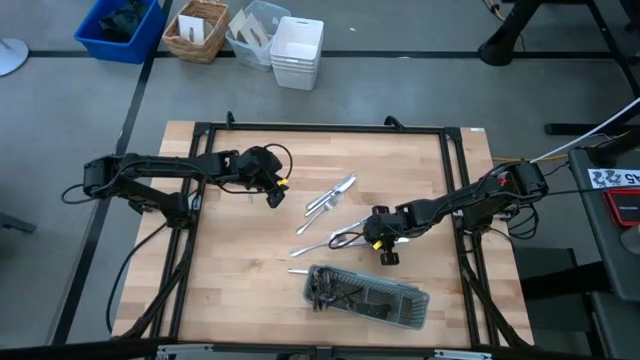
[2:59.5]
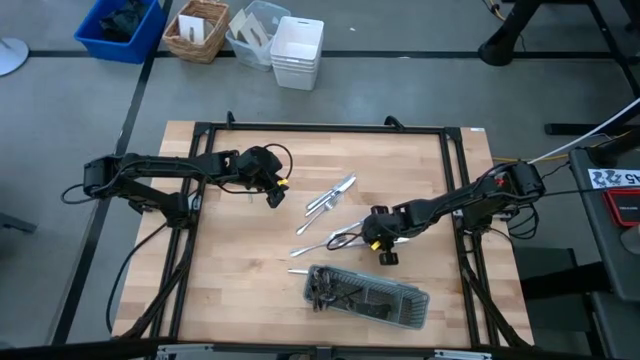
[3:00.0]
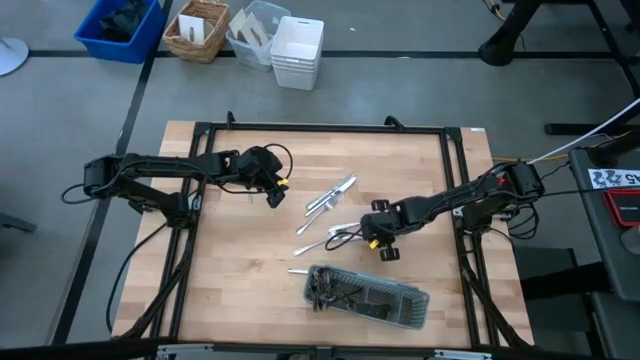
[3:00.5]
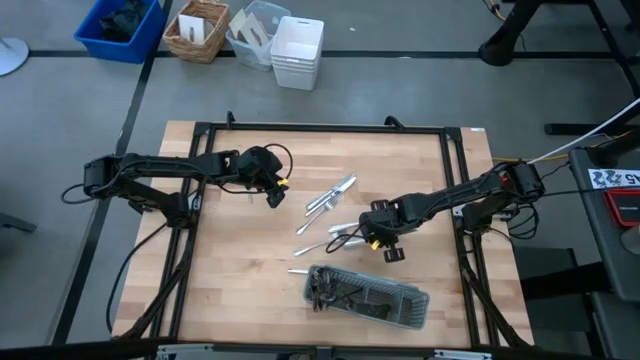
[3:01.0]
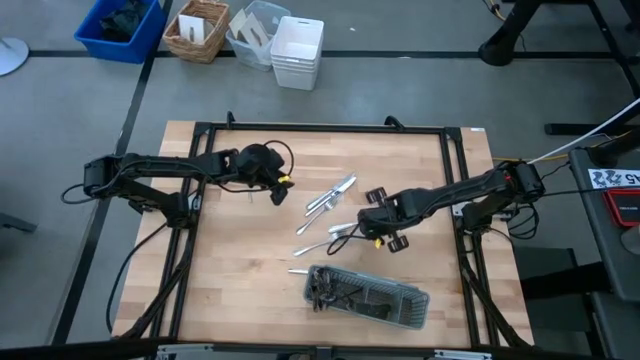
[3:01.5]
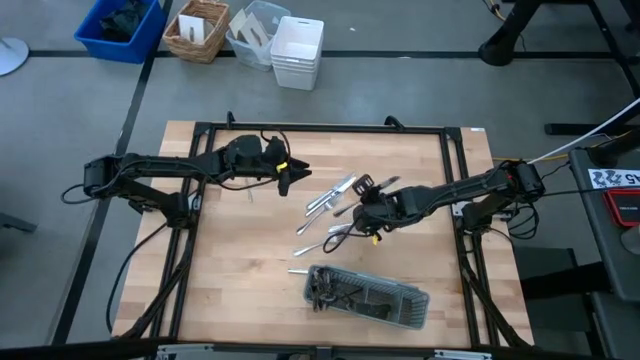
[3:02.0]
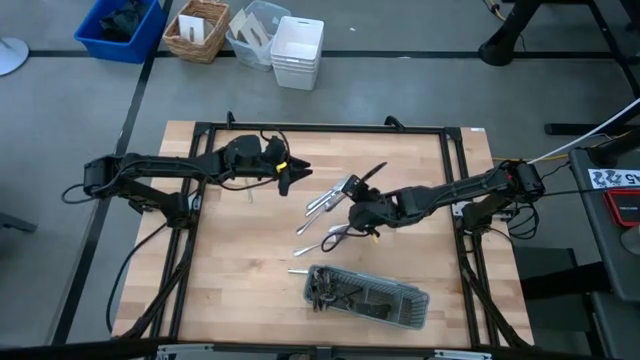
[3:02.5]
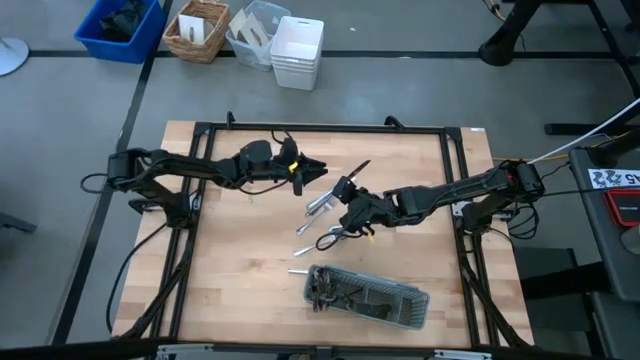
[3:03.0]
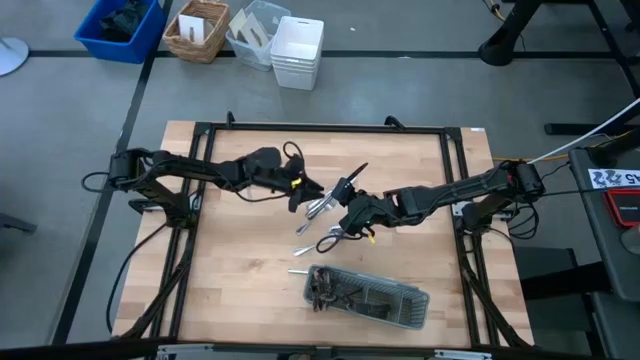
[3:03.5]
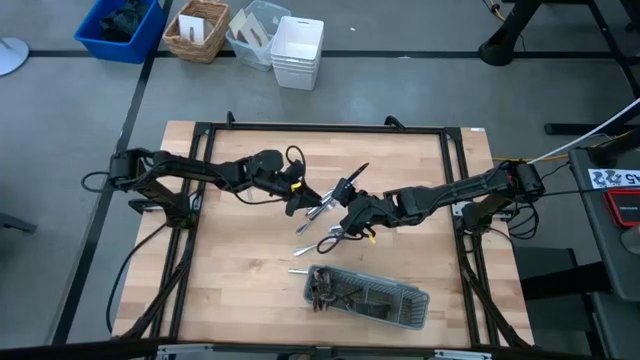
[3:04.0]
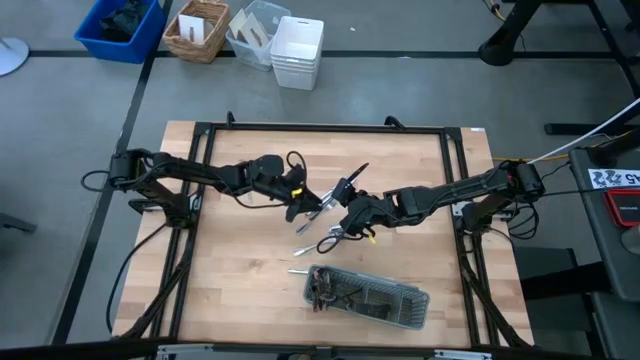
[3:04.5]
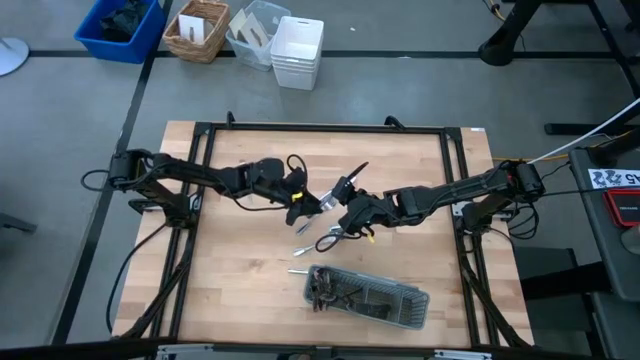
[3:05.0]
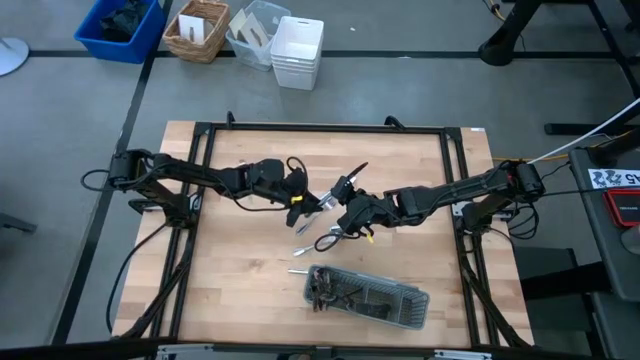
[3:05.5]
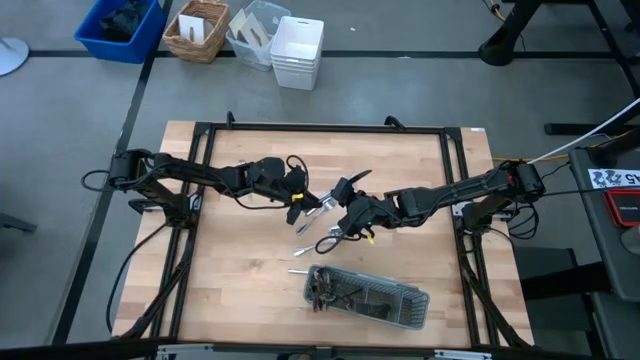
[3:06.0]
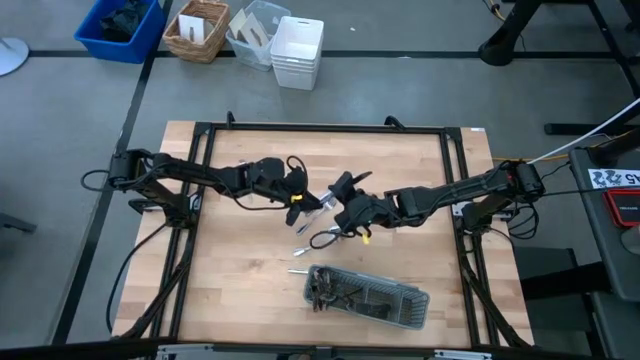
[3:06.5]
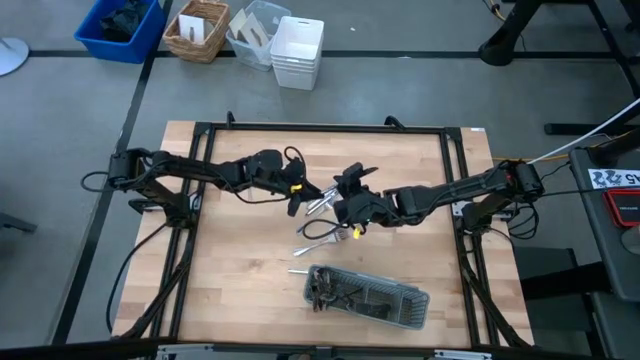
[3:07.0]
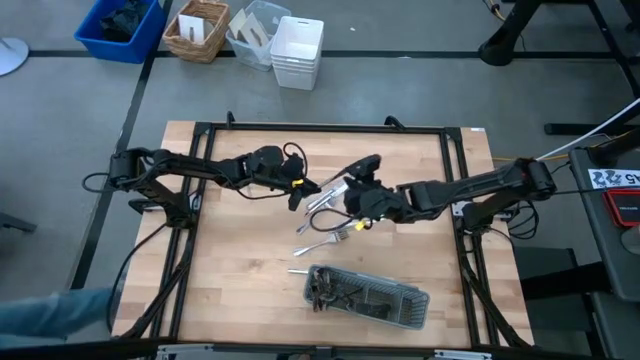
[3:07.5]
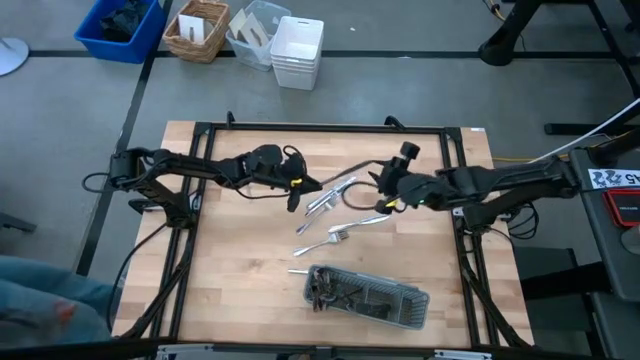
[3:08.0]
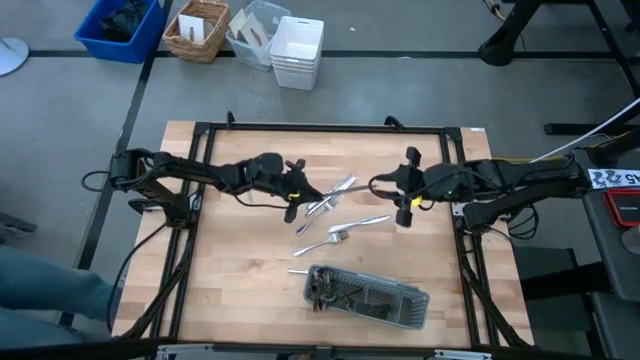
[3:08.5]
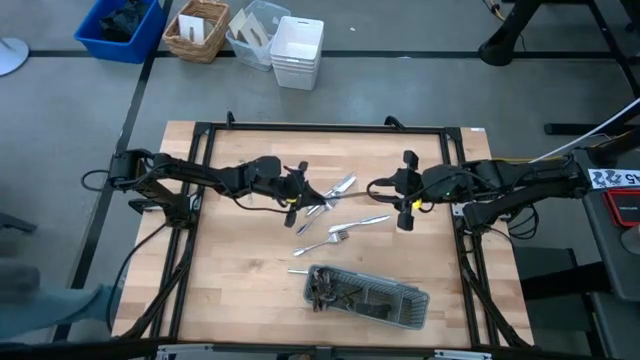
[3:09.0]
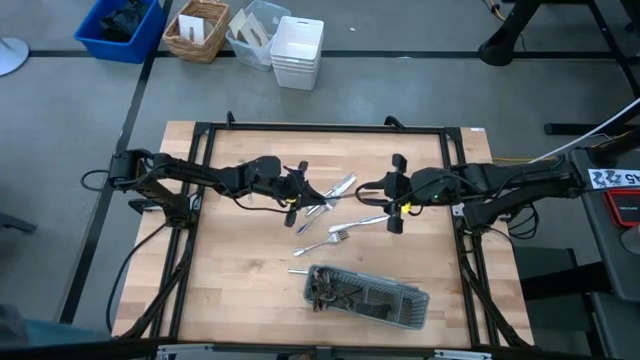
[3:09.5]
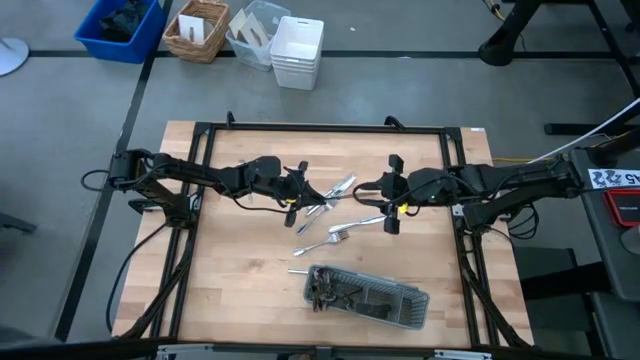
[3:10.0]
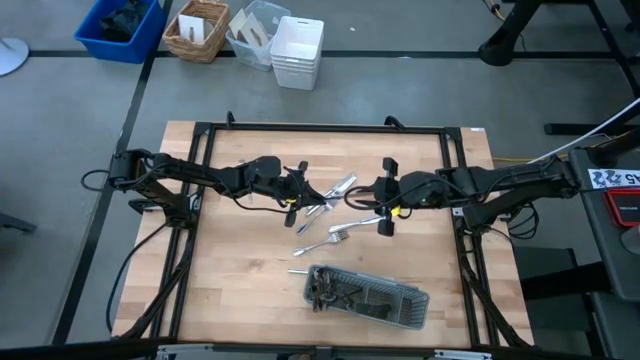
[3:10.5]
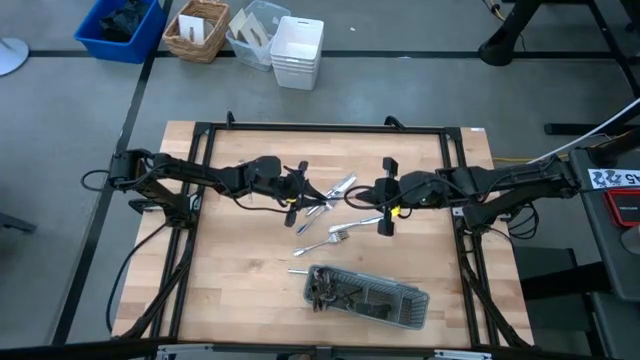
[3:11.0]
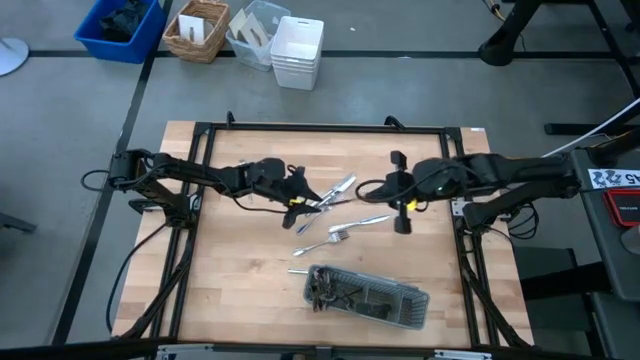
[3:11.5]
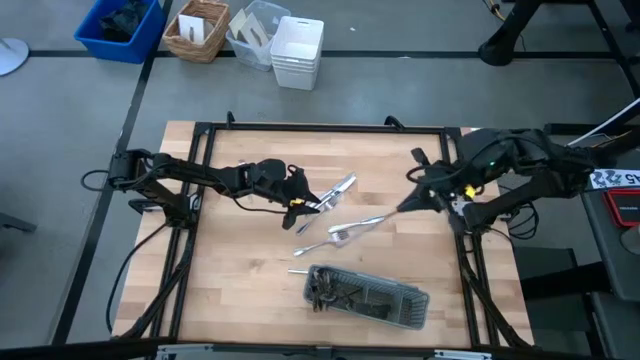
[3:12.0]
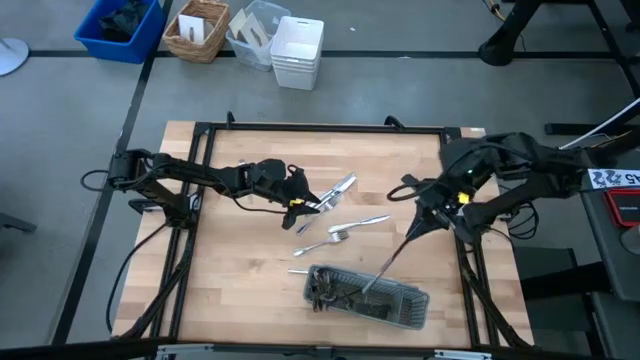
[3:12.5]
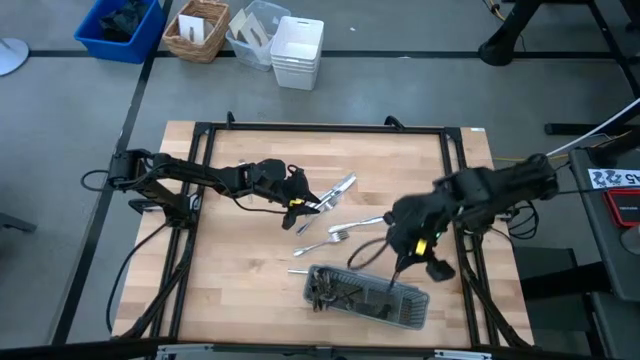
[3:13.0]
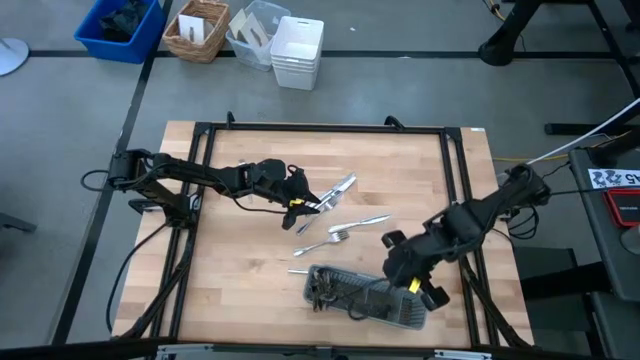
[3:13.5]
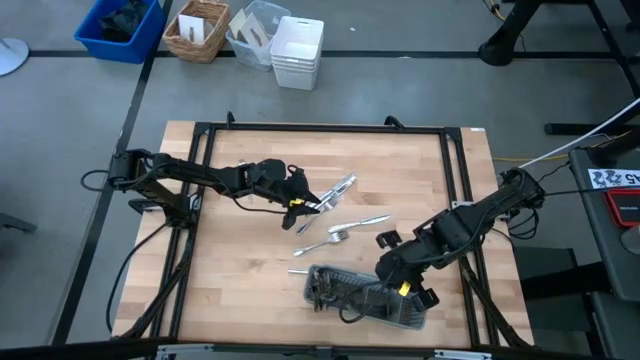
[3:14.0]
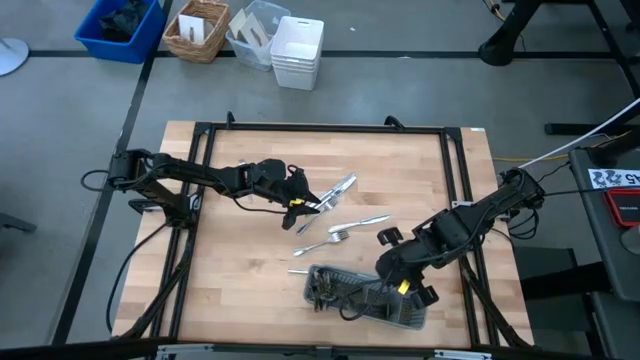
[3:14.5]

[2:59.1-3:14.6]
Task: Sort silverware
Put the knife into the gray silverware rack

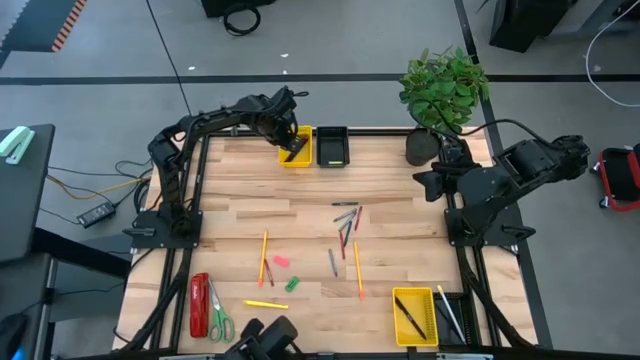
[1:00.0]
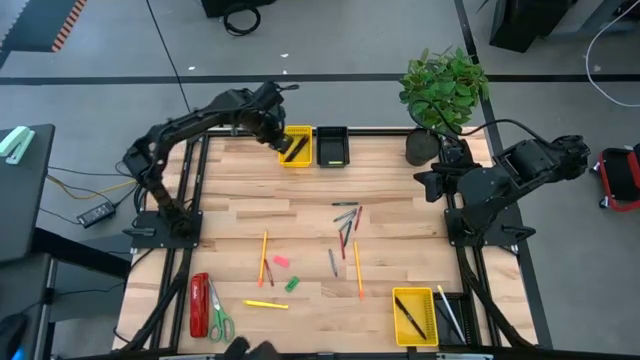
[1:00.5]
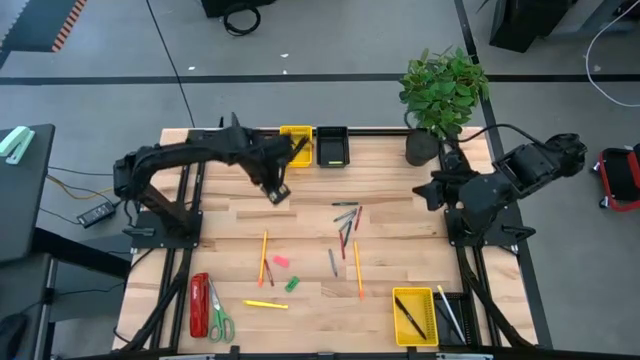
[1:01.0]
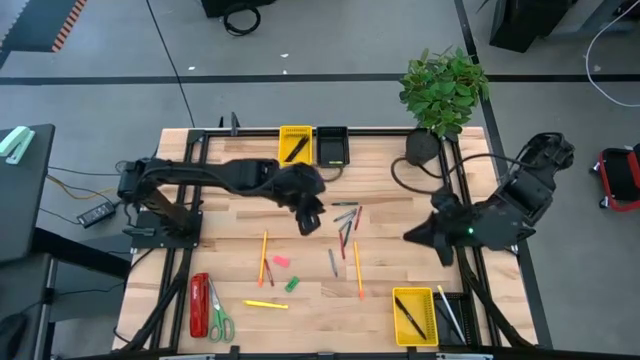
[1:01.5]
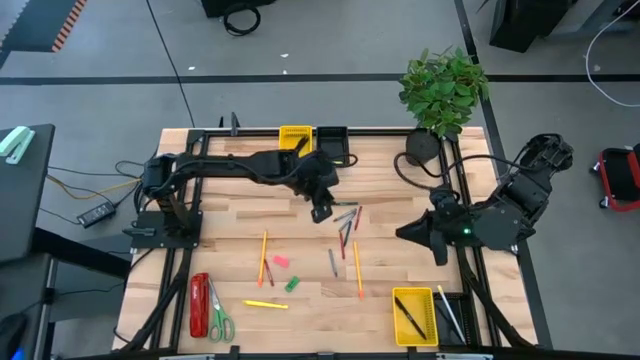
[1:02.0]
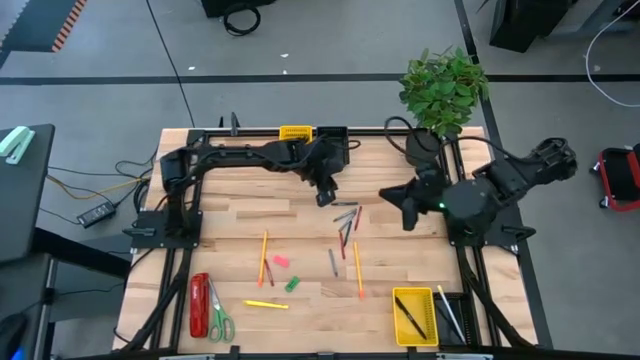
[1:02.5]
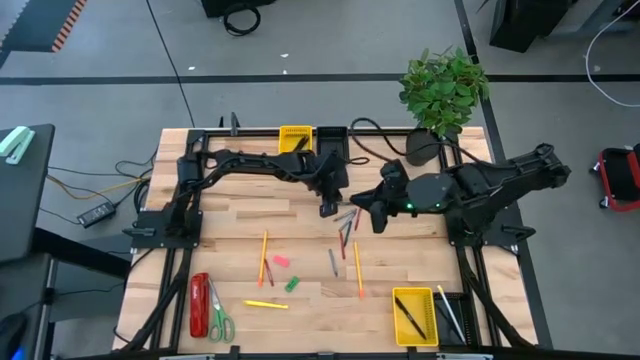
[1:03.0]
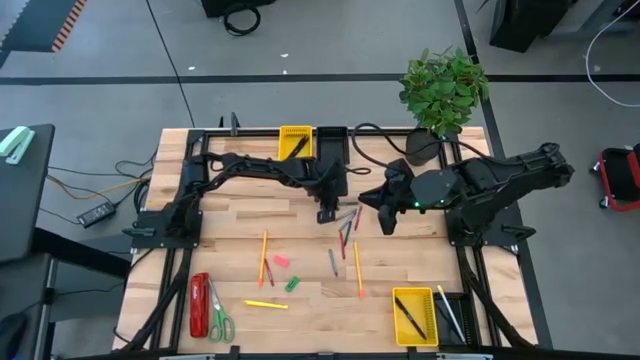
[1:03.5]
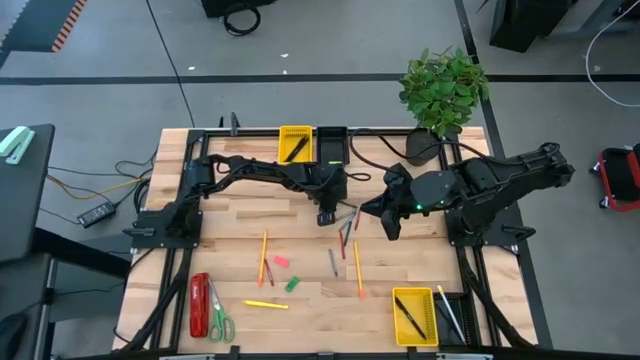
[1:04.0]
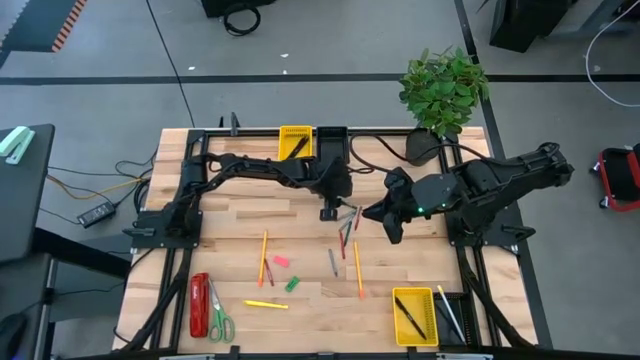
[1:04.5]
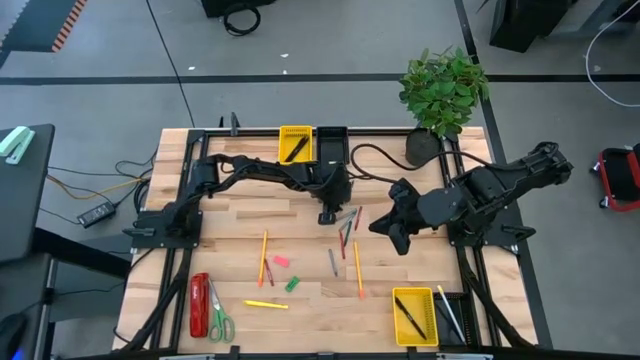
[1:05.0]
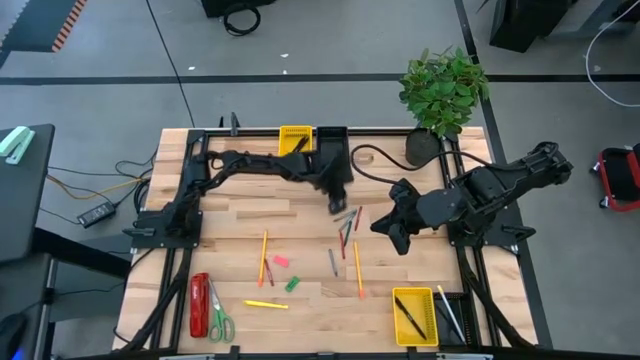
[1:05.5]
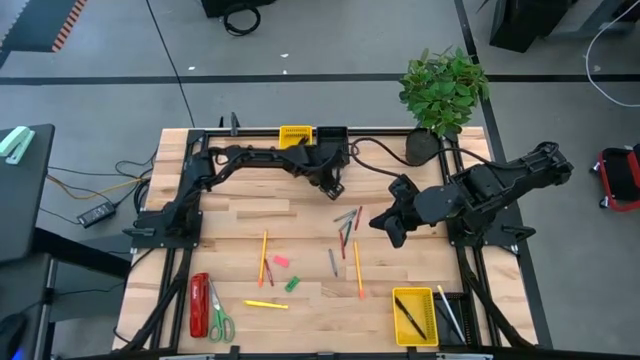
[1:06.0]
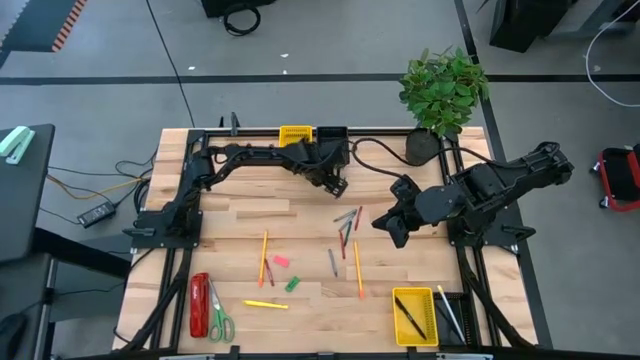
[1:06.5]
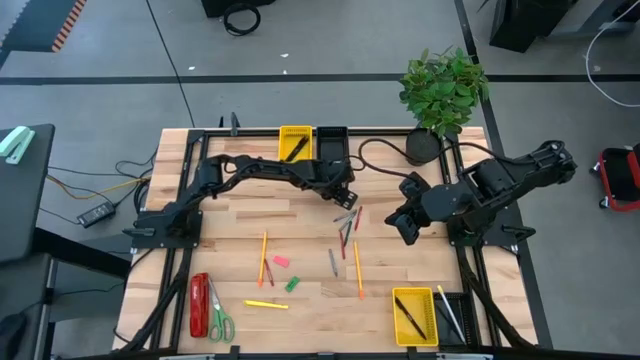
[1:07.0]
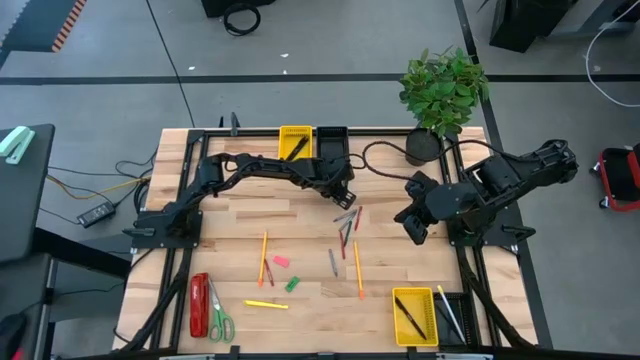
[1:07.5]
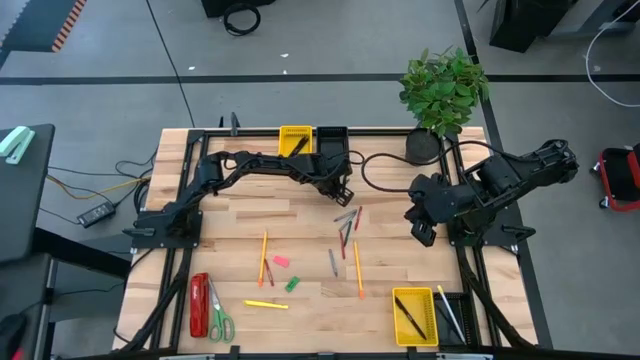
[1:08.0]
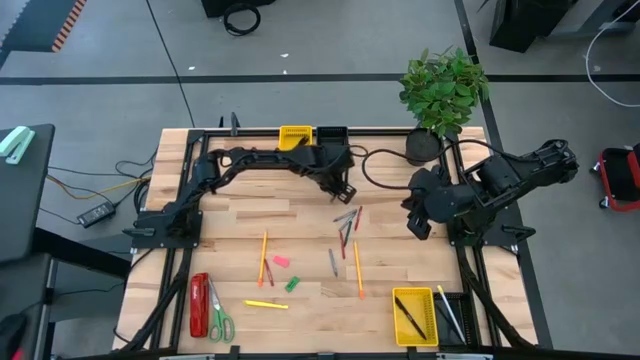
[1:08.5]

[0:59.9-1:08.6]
Task: Sort crayons/erasers/pens/pencils in bins
Put the top green crayon into the bottom yellow bin
